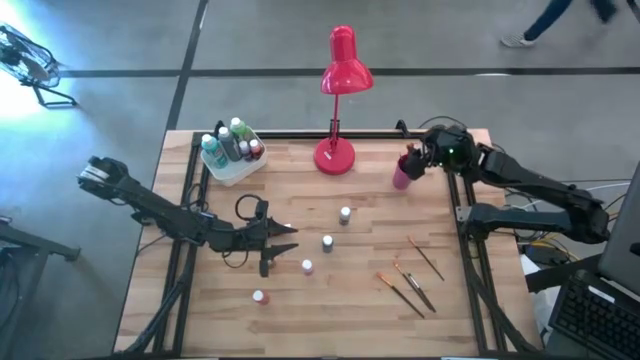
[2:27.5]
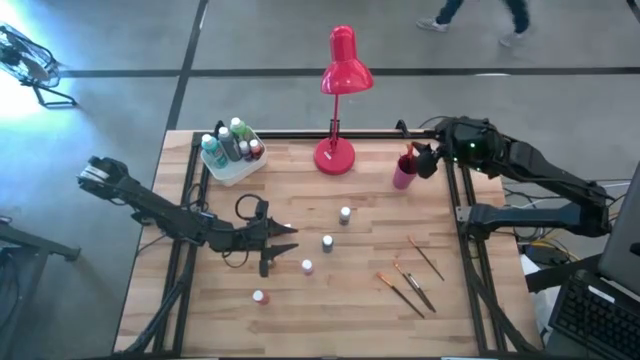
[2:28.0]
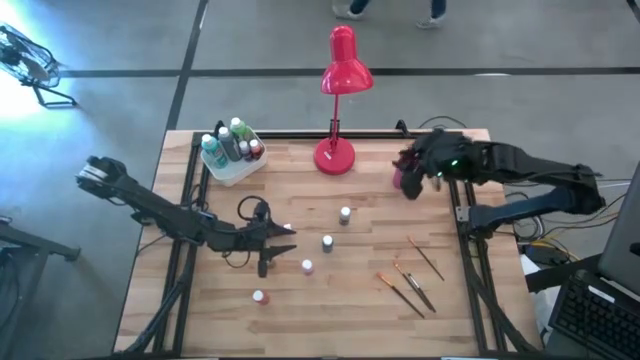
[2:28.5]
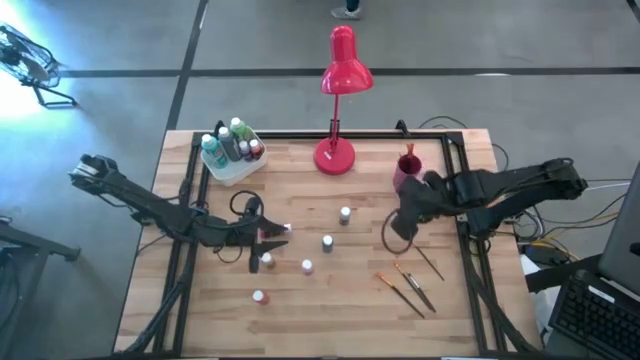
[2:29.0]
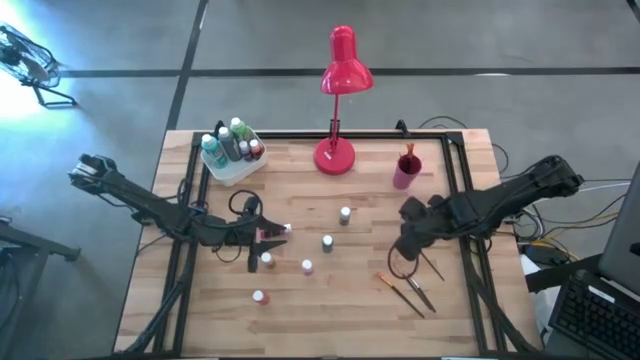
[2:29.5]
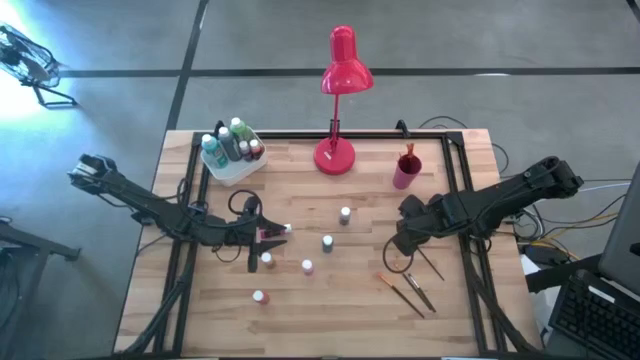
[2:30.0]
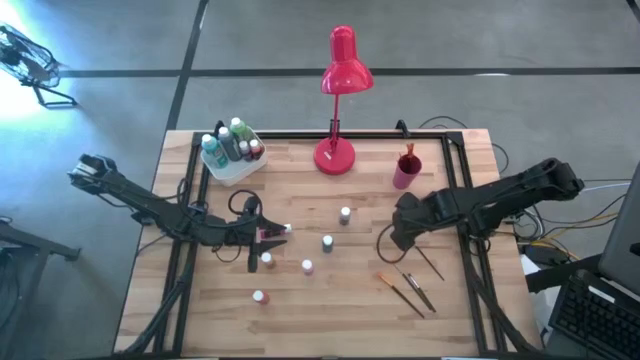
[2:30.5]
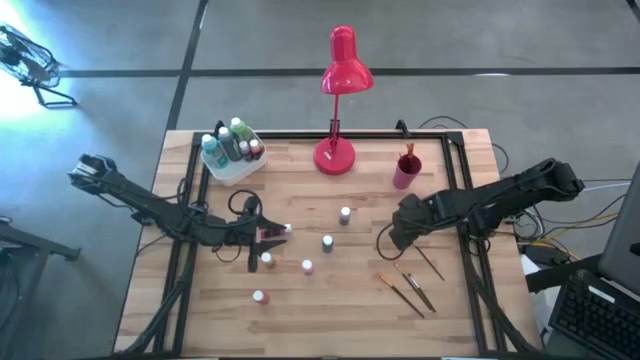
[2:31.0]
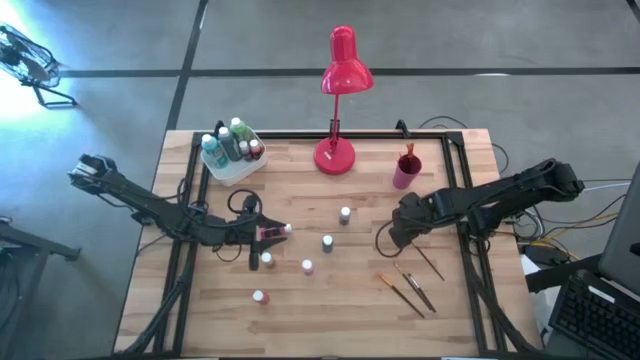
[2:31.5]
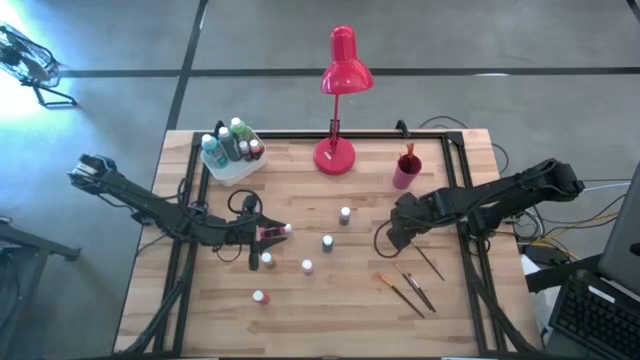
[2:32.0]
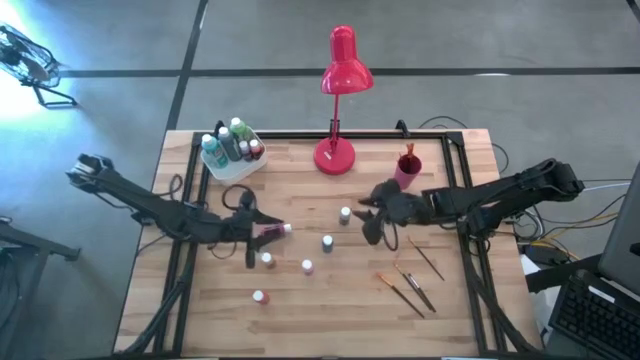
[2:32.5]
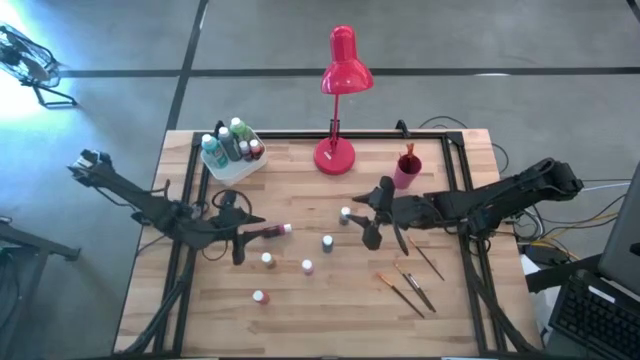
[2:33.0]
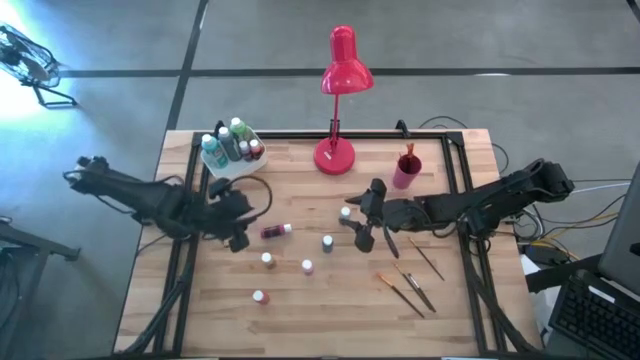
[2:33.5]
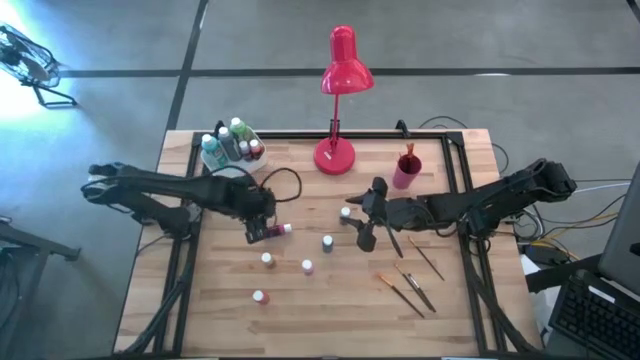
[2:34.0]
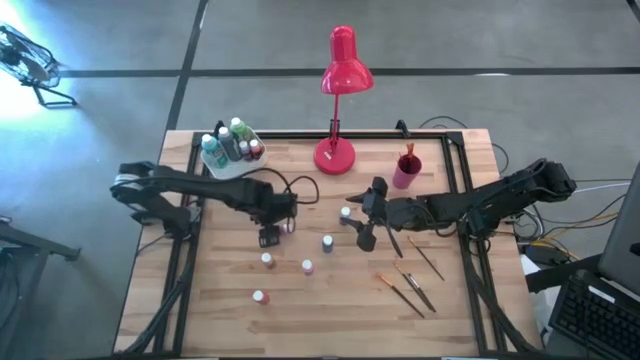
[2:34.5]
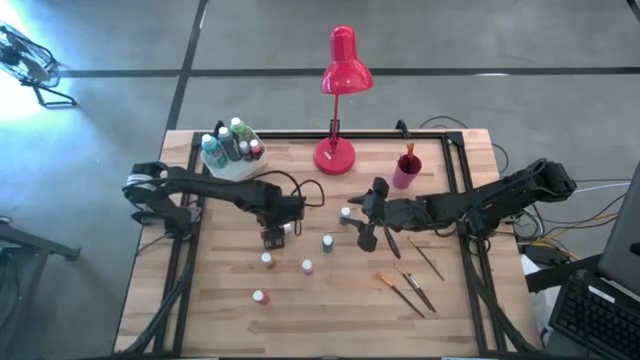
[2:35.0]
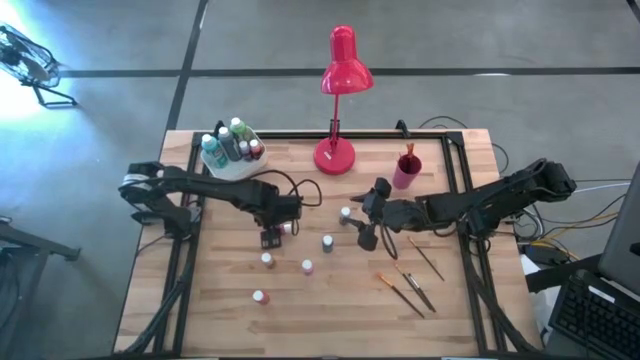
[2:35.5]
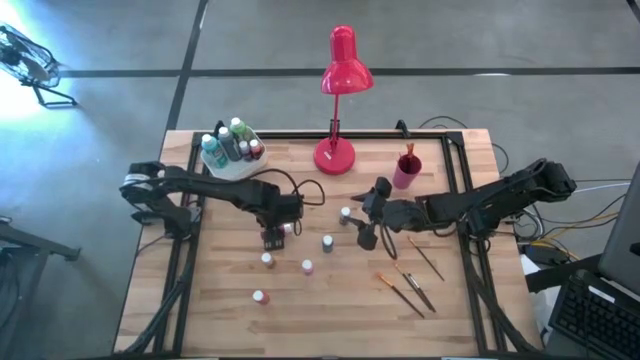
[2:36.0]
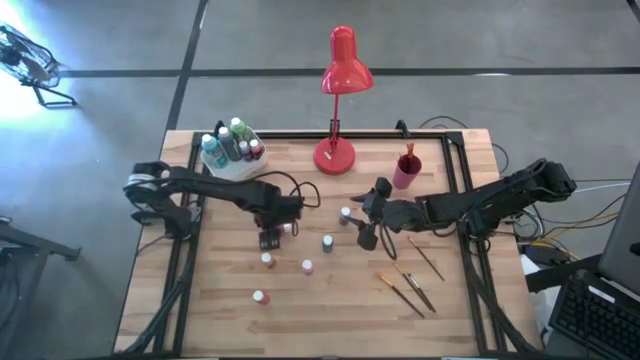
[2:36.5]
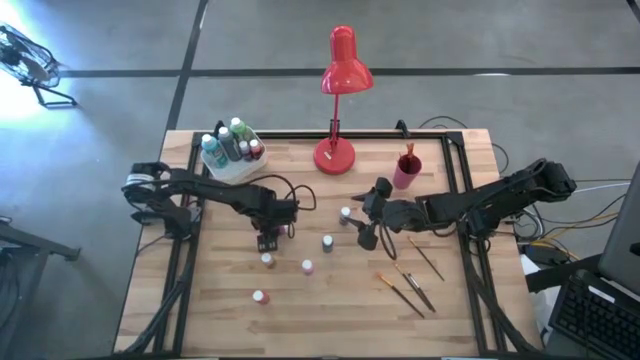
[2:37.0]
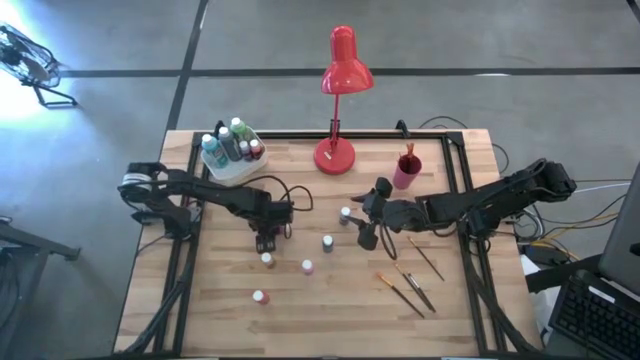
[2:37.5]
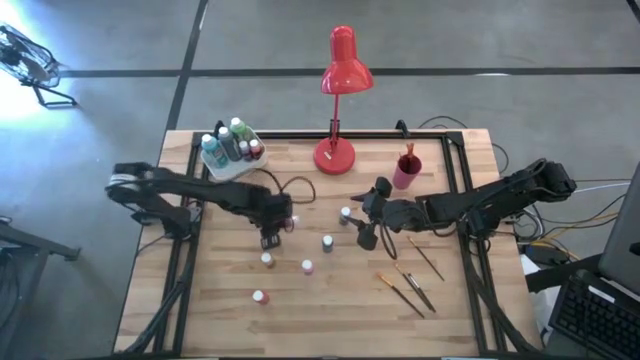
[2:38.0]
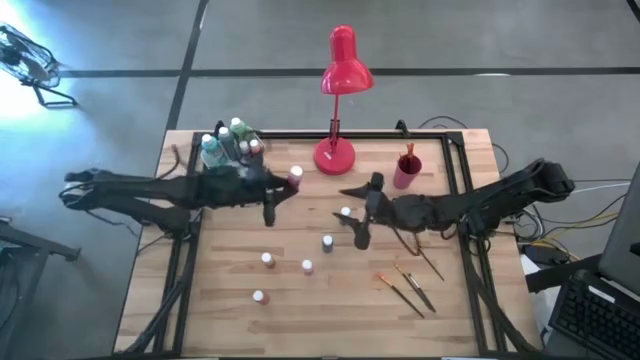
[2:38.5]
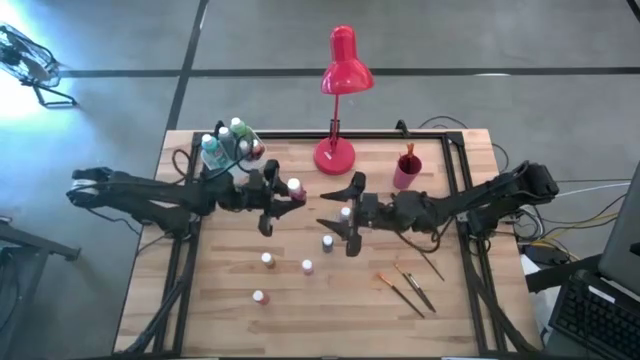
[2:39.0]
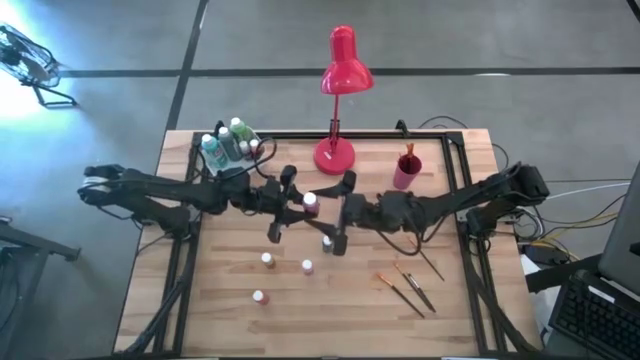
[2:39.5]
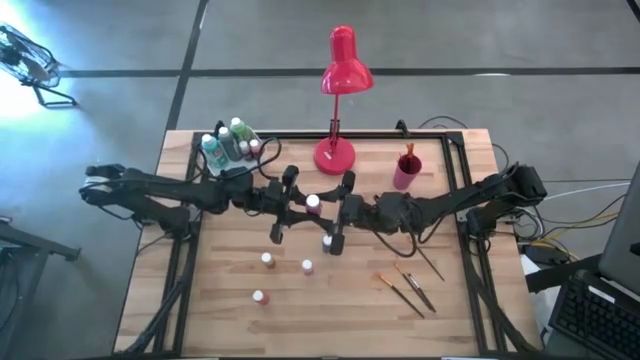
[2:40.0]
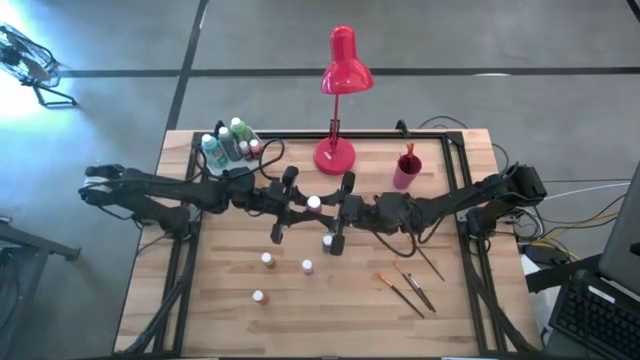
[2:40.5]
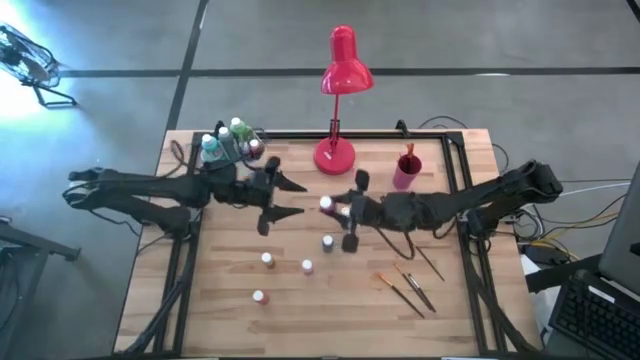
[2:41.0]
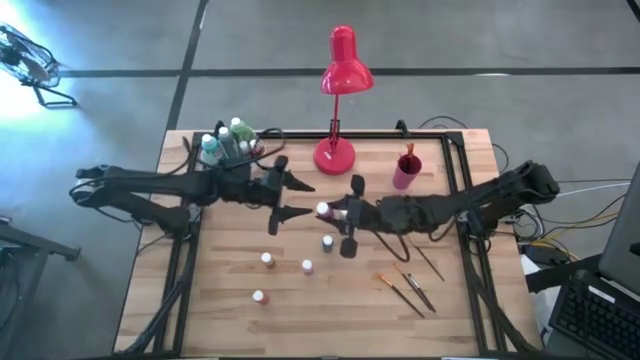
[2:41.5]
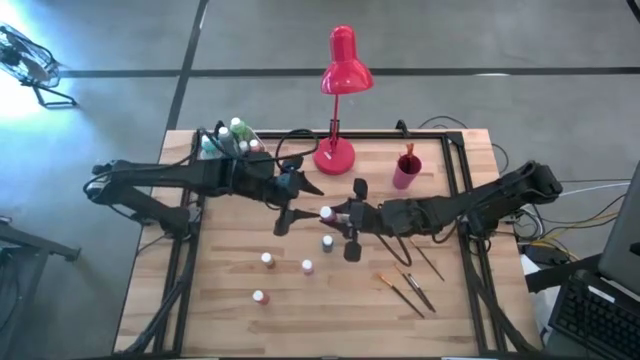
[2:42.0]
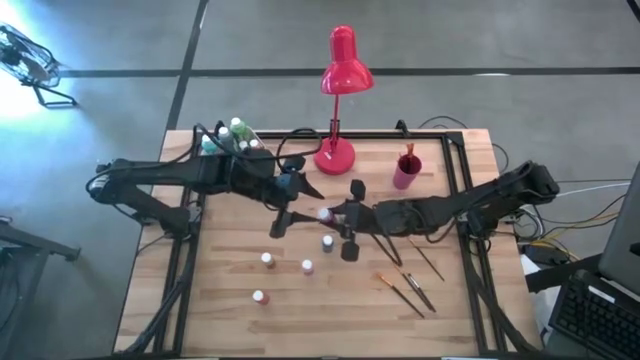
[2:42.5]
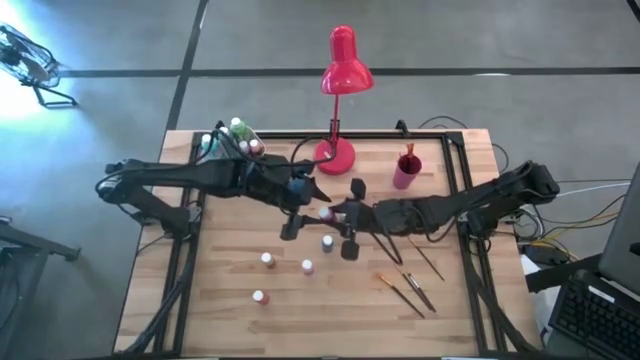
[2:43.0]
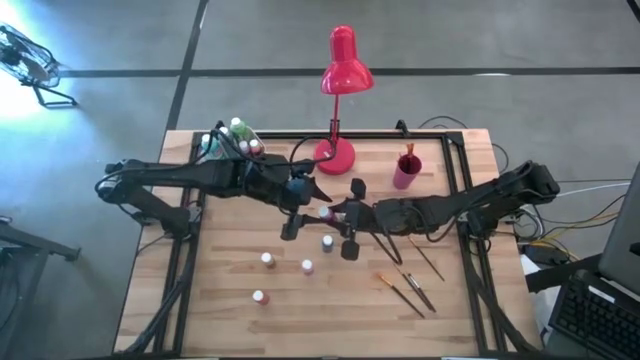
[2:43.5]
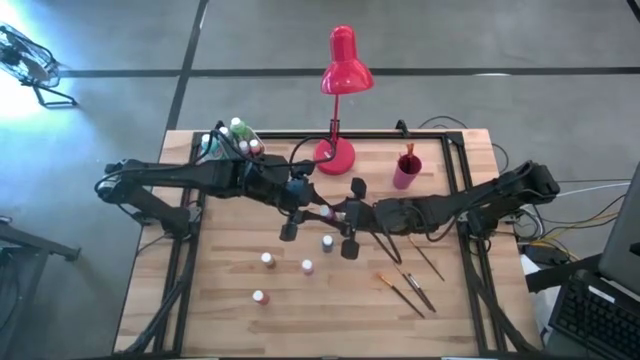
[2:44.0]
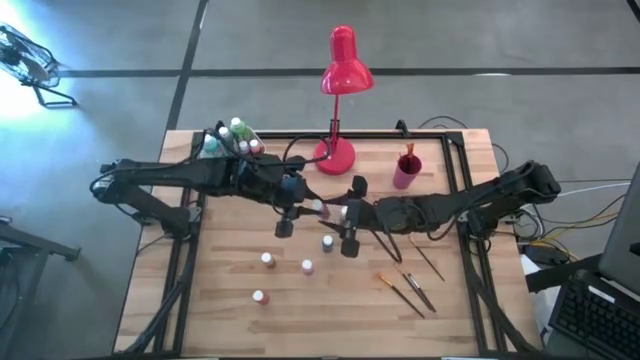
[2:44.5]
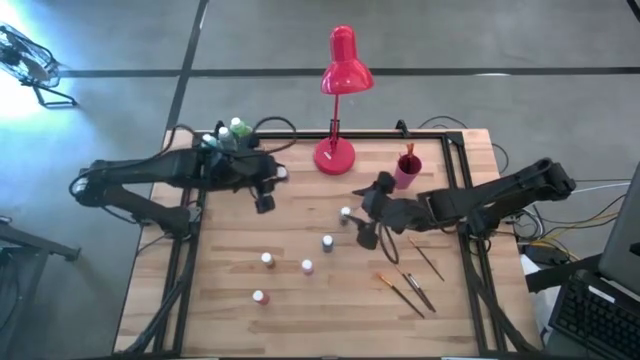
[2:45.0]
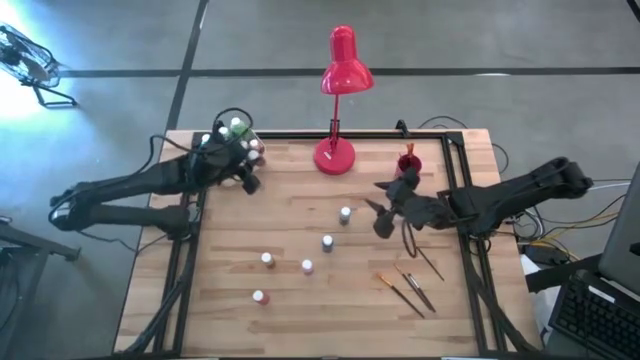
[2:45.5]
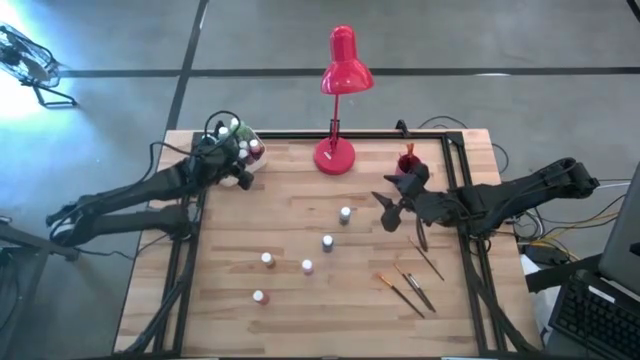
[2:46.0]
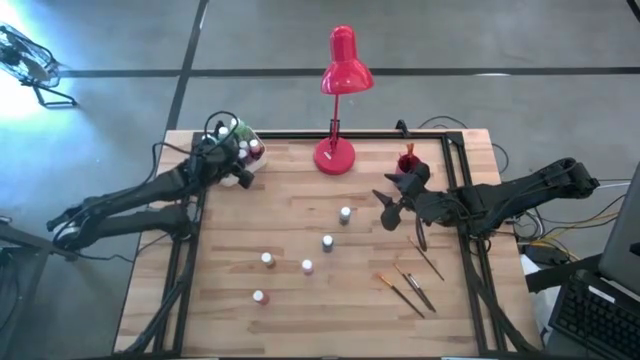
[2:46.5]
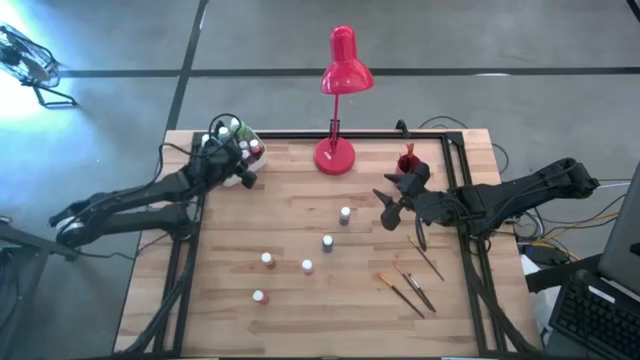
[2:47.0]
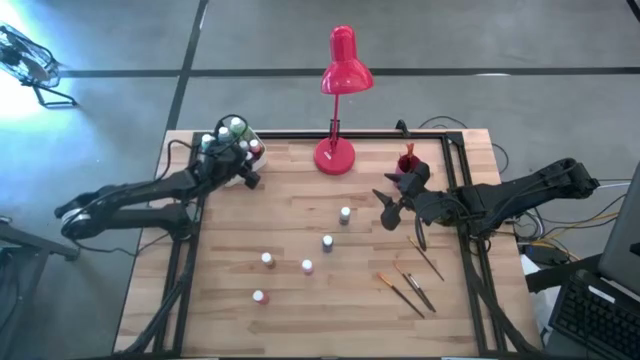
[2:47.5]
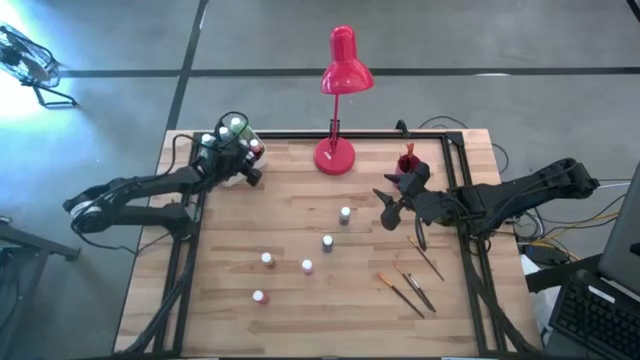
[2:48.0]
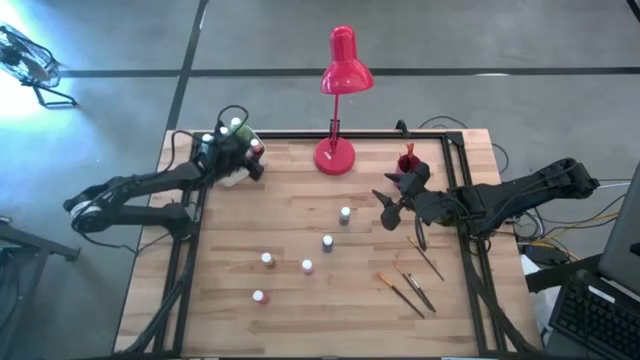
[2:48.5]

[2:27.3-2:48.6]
Task: Pick & Place Paint Supplies
Put the pink paint bottle into the white bin
